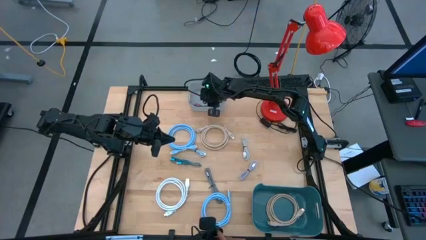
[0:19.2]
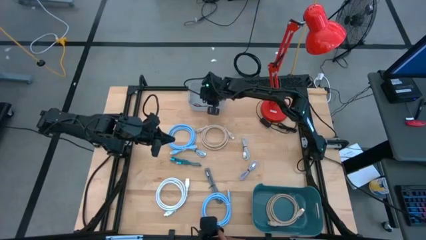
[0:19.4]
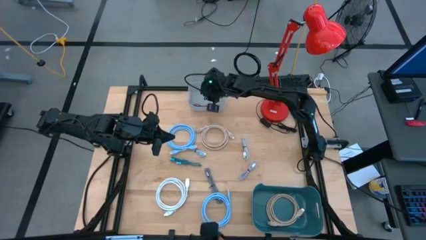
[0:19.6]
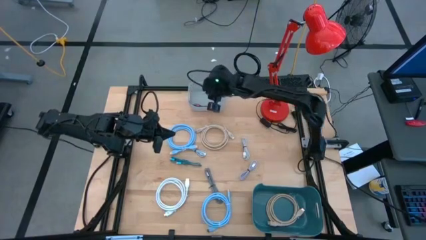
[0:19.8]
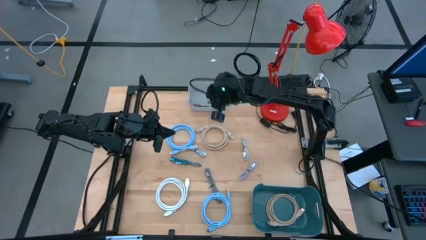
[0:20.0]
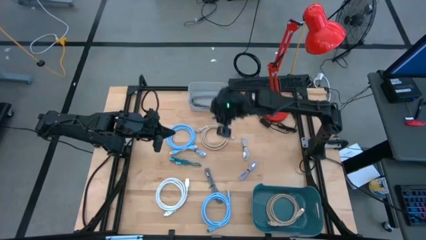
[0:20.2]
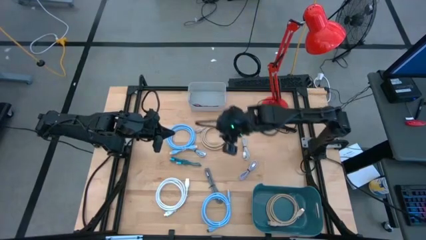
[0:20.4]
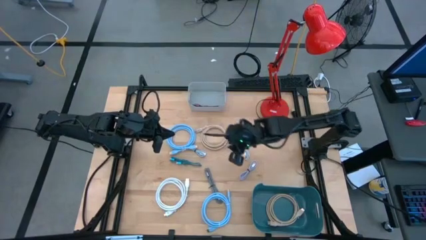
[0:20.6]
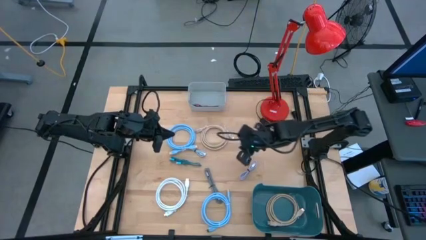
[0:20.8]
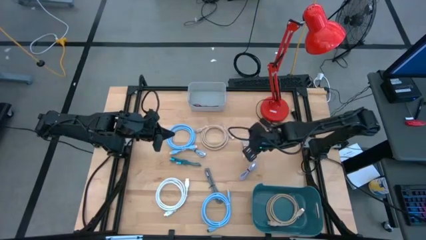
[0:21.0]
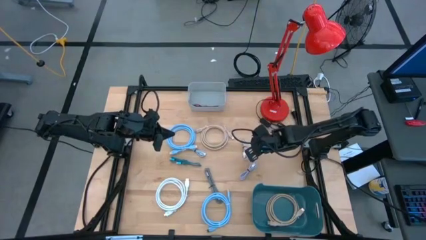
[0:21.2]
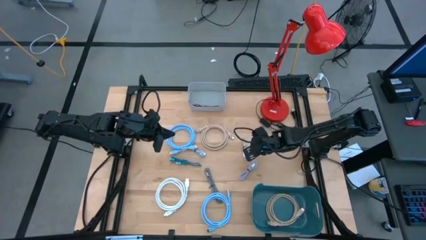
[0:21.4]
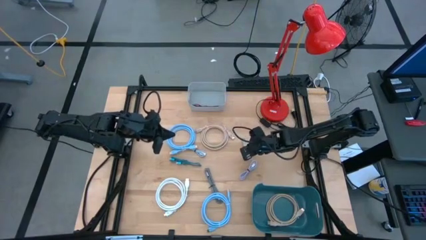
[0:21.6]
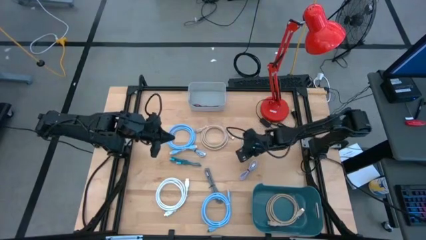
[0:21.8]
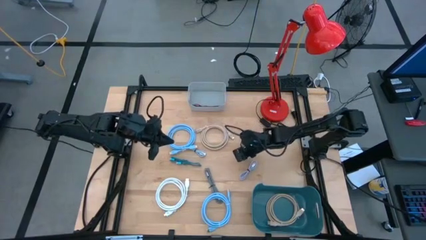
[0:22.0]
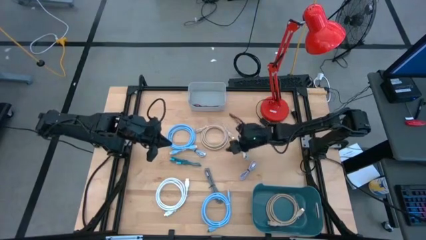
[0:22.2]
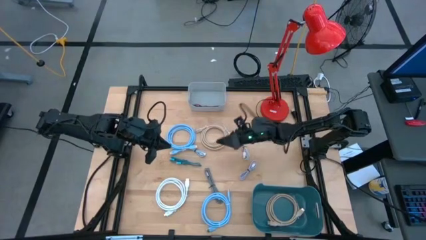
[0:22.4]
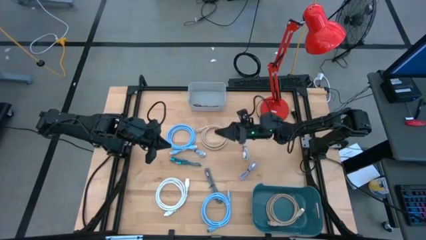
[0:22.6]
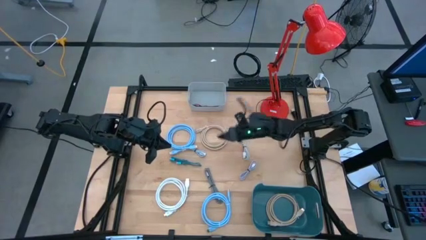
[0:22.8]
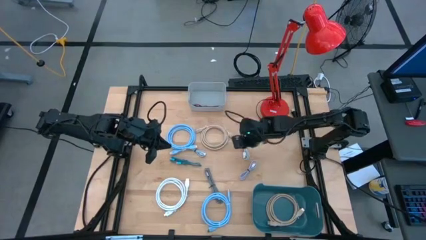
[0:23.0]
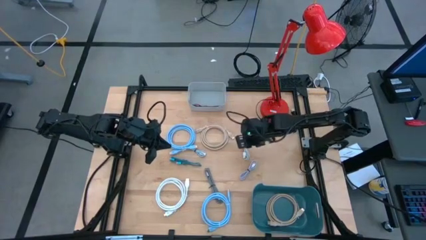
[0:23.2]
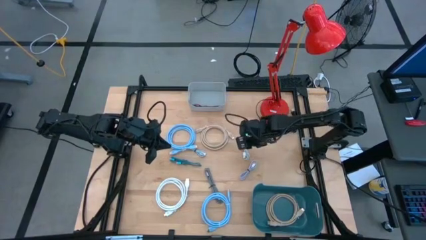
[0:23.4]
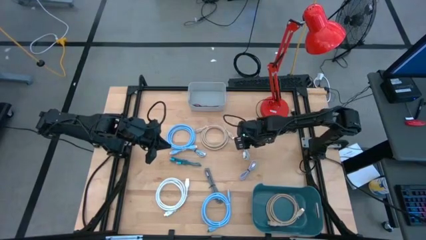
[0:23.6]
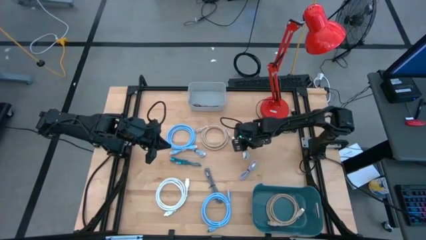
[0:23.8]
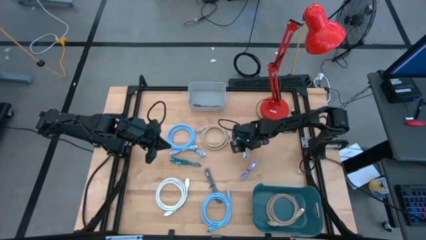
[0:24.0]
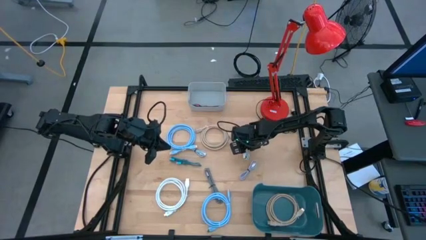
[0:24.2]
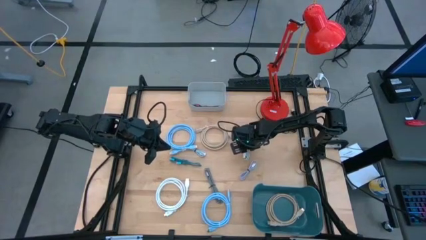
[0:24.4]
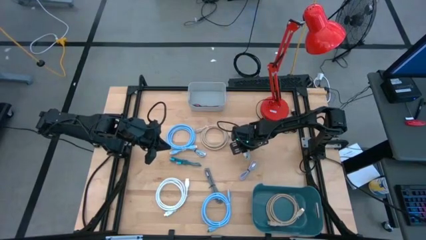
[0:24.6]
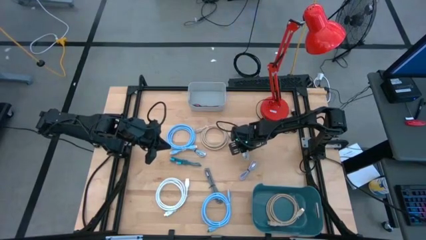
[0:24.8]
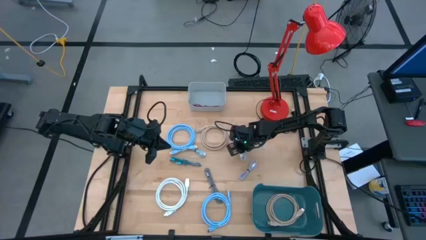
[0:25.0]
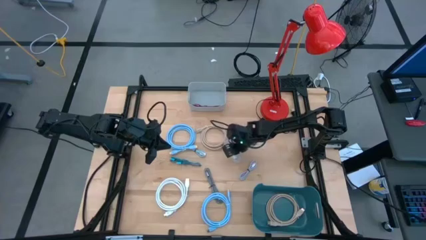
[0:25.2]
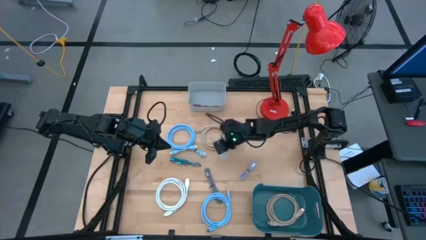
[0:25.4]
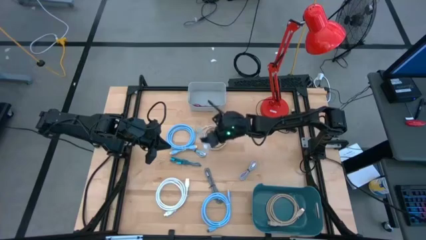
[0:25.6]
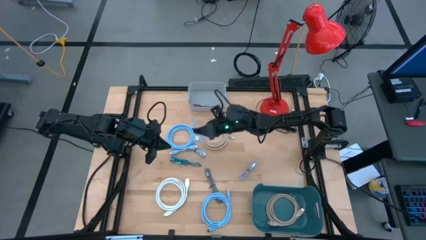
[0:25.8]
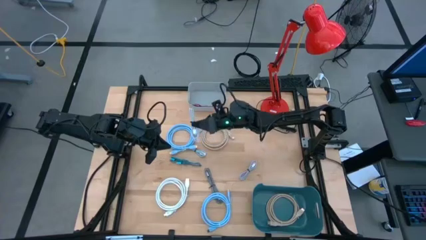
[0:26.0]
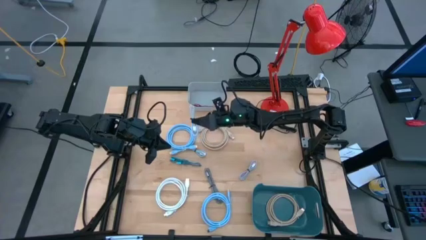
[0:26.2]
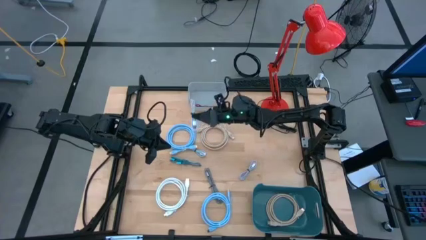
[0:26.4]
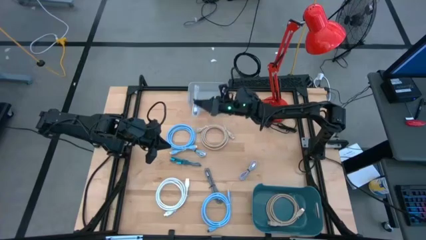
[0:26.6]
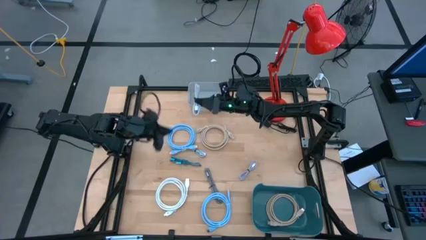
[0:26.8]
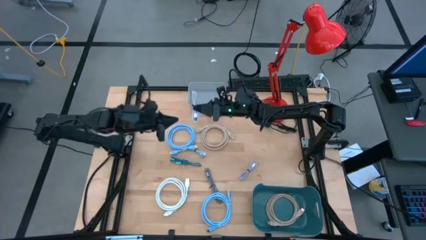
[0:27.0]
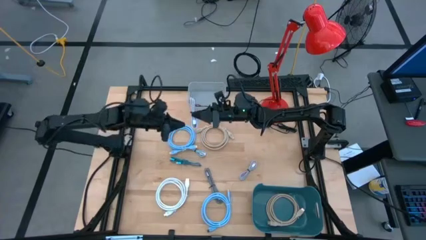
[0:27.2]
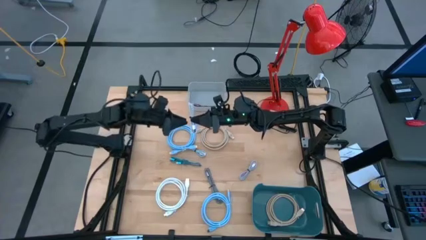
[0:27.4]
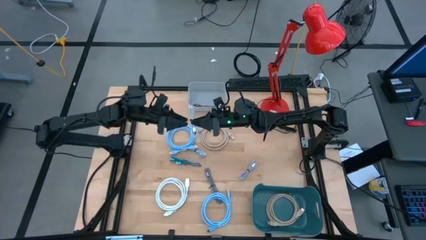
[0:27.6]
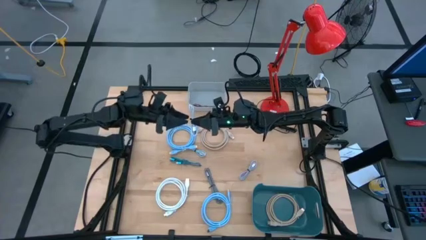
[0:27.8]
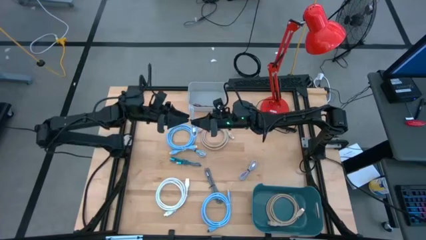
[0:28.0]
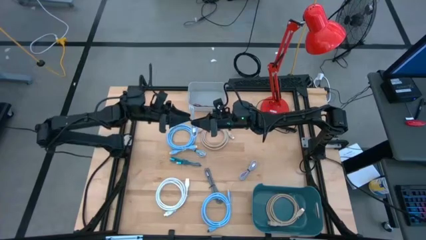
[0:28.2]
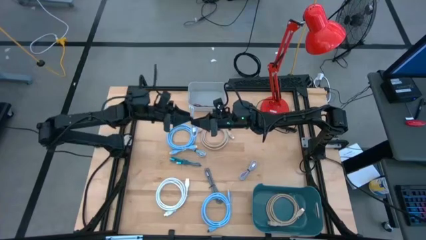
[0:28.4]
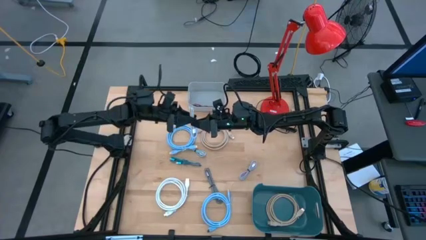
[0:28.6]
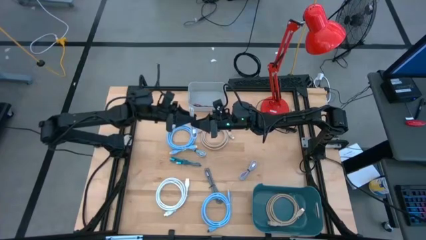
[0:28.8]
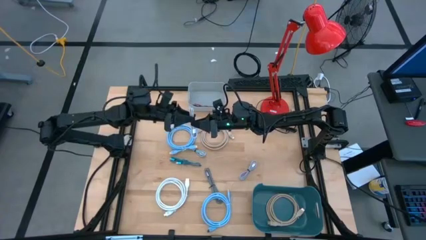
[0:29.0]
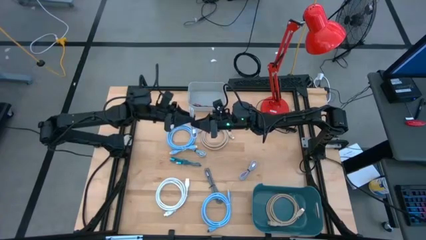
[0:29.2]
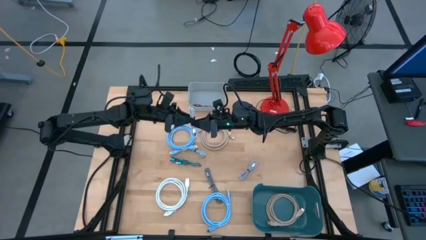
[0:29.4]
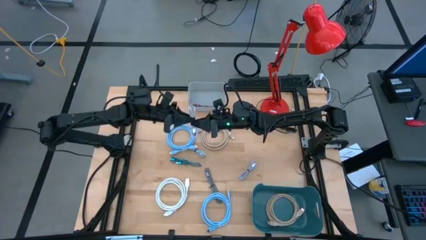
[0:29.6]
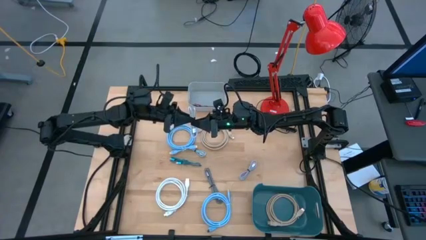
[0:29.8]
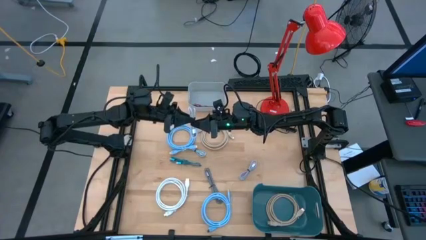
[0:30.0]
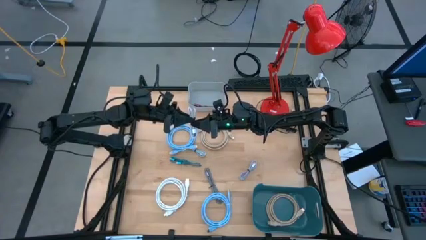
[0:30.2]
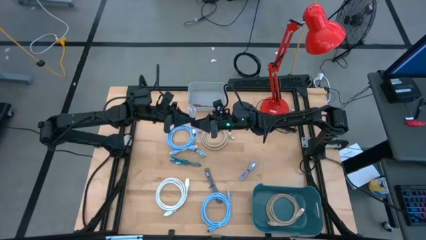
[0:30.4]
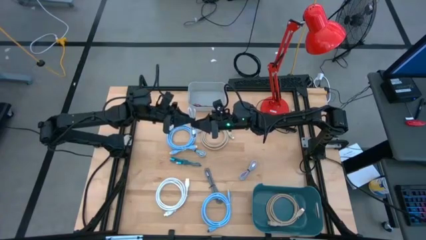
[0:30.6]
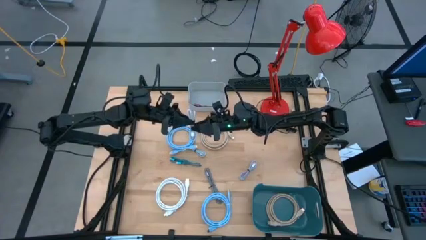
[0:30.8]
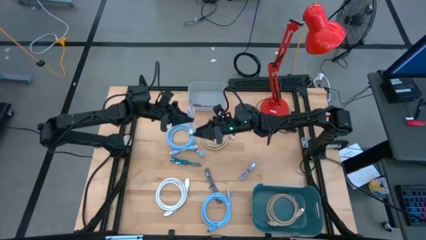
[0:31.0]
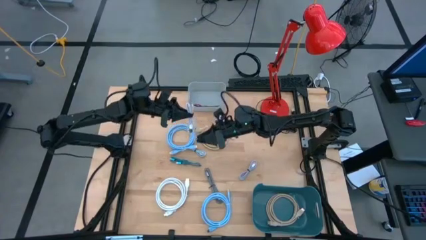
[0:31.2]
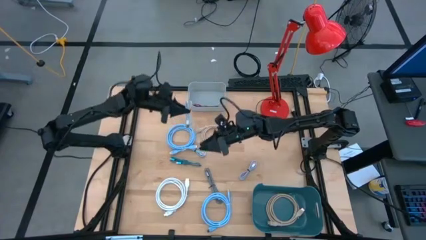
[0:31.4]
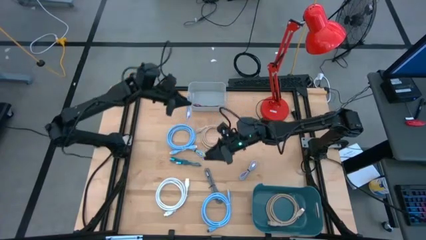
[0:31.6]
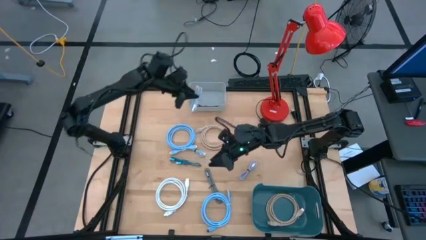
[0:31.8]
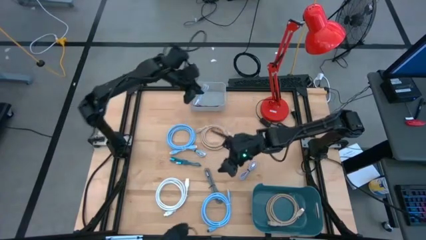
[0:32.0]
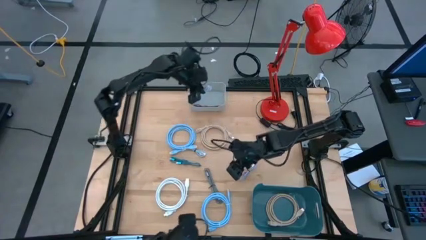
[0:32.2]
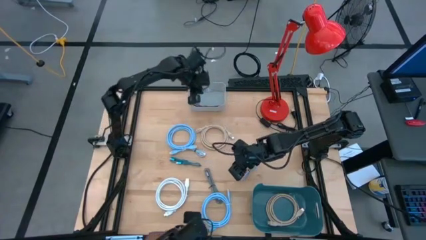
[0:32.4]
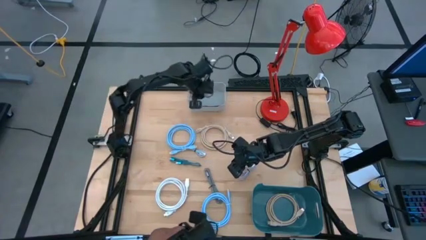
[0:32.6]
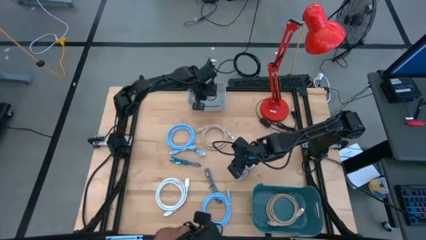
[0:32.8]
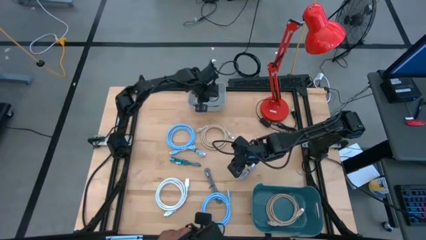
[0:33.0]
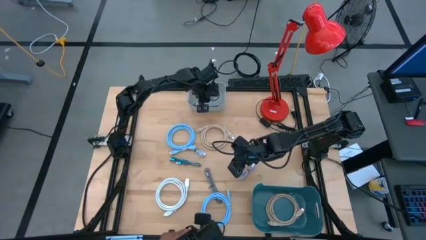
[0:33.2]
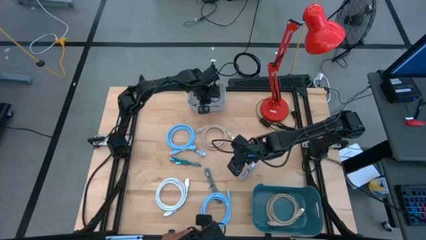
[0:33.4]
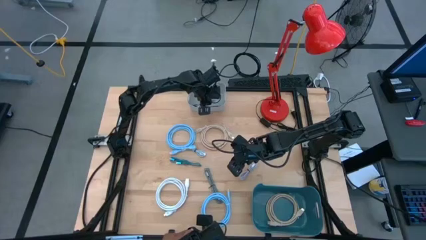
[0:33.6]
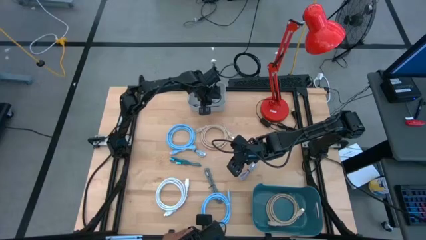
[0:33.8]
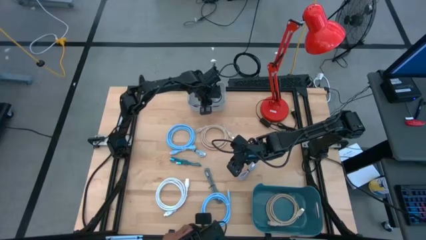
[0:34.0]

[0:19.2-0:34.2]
Task: Pick & Place USB Port
Put the white usb cable into the gray bin

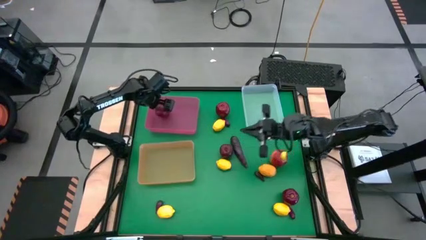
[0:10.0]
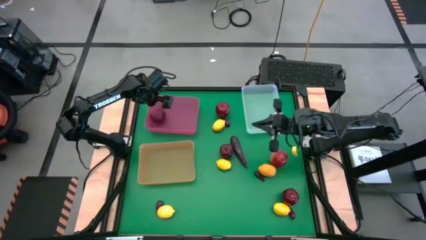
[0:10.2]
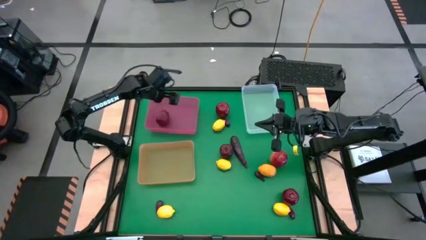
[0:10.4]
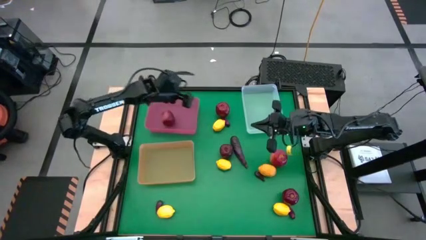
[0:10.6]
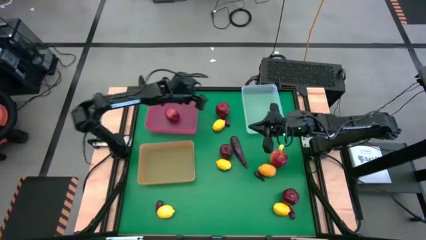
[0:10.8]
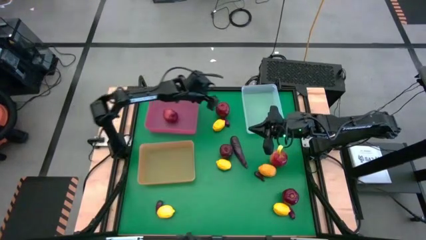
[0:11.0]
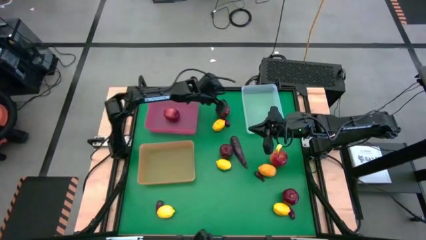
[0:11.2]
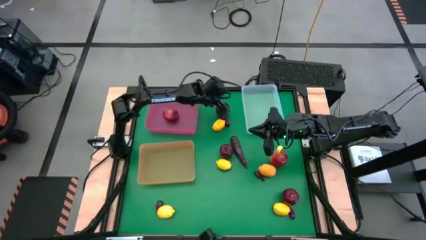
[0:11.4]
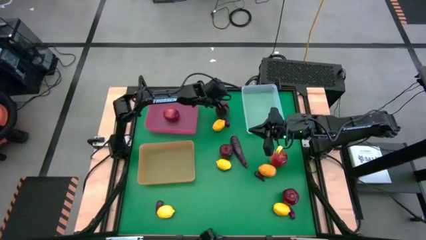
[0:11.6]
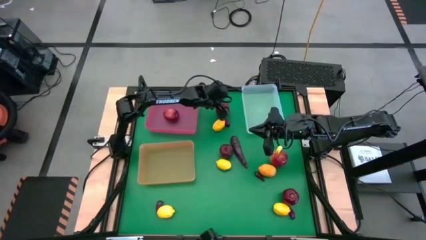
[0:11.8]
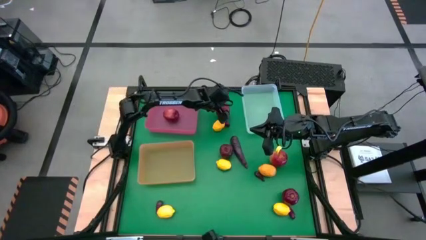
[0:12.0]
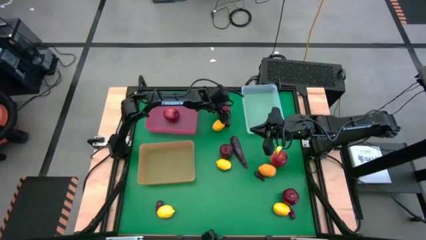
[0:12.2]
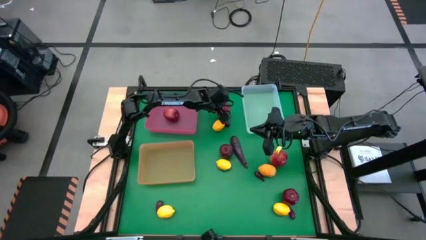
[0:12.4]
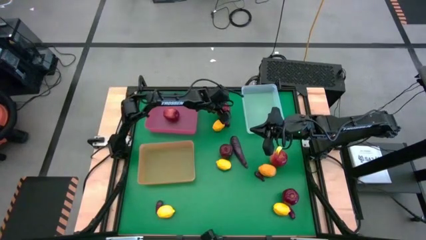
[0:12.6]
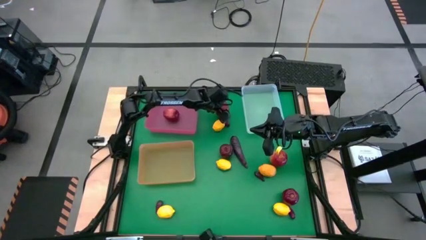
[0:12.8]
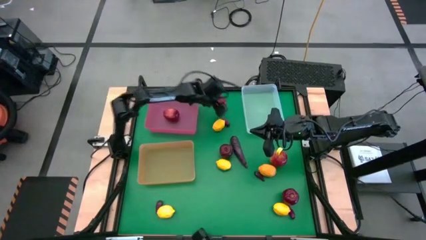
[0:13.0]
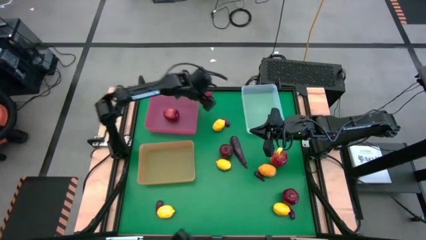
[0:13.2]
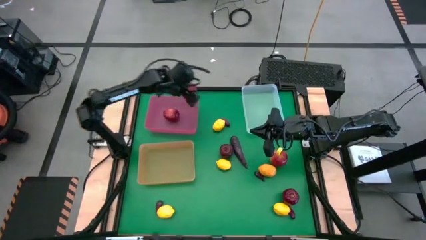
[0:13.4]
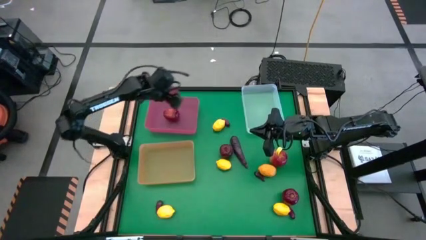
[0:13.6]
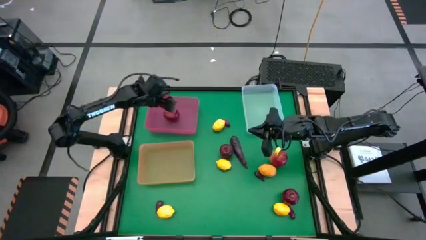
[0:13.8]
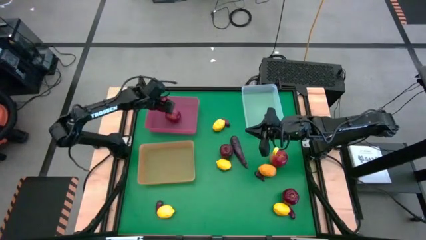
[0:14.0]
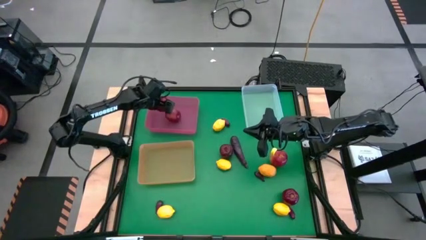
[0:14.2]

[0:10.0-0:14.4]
Task: Sort produce into baskets
Put the apple into the pink bin
